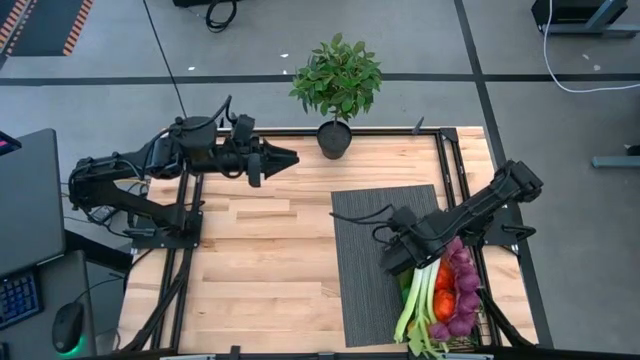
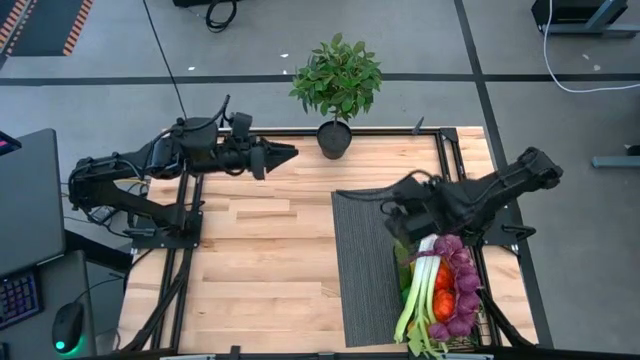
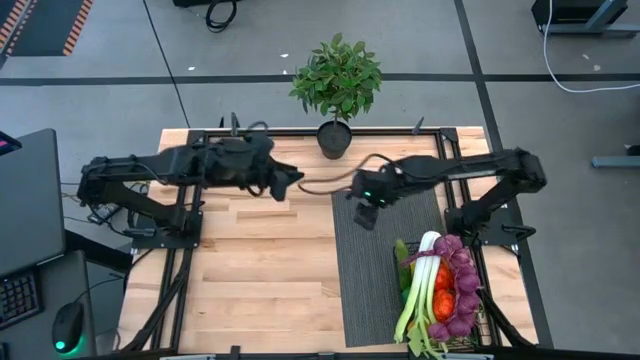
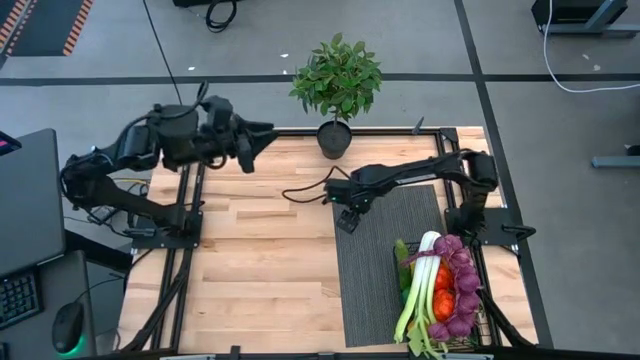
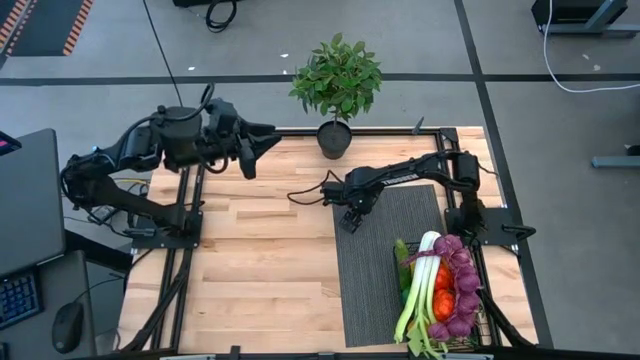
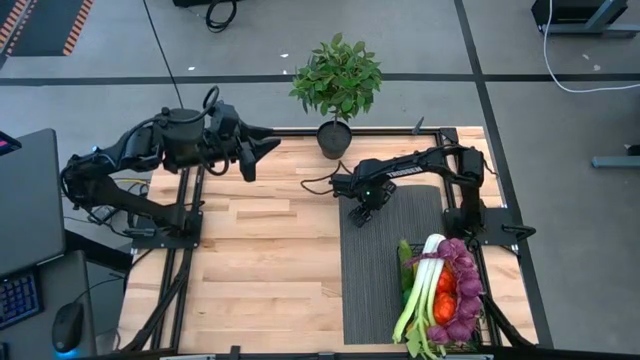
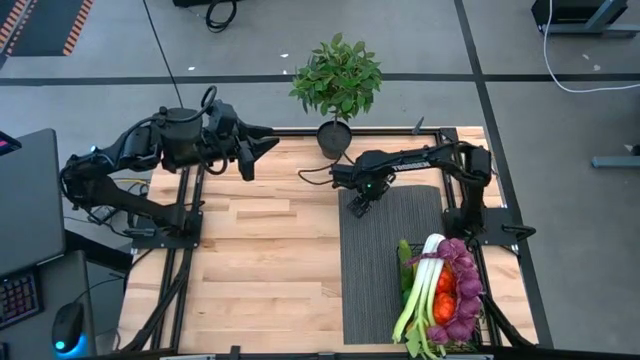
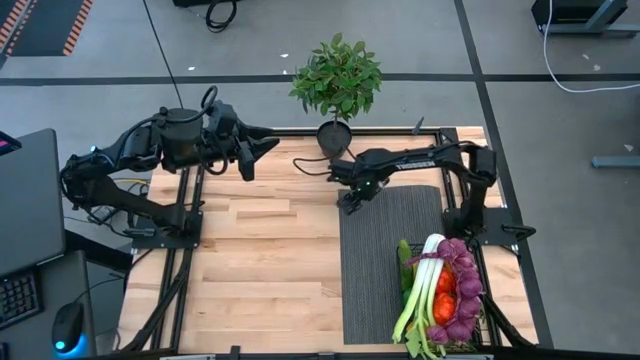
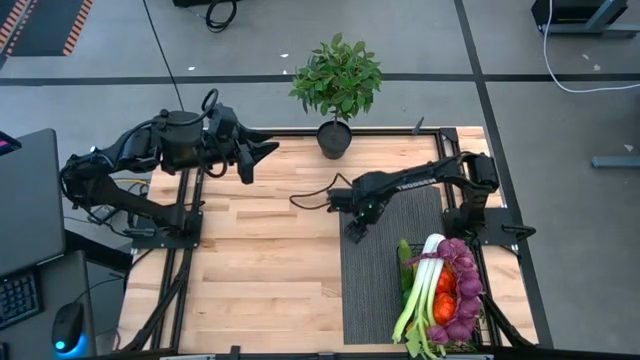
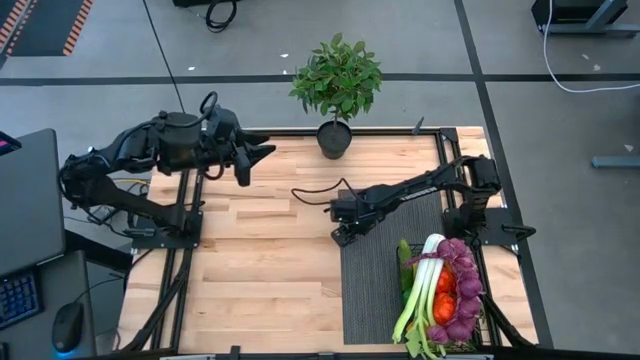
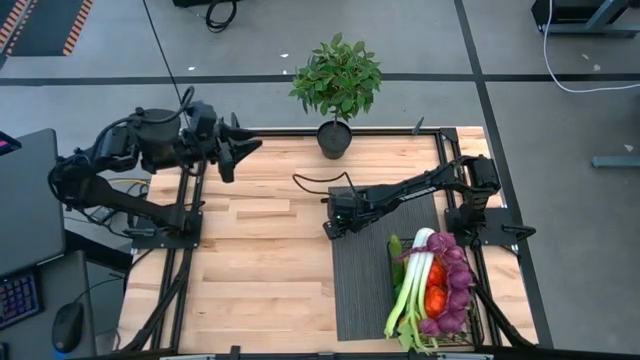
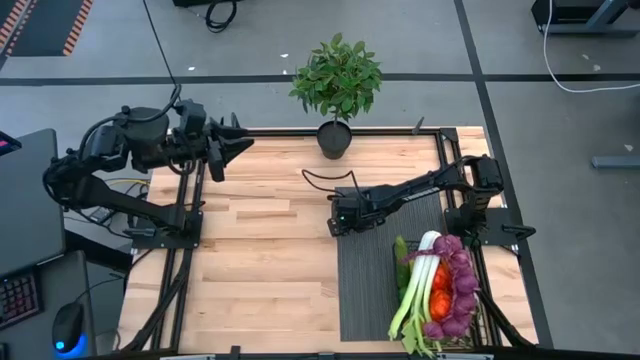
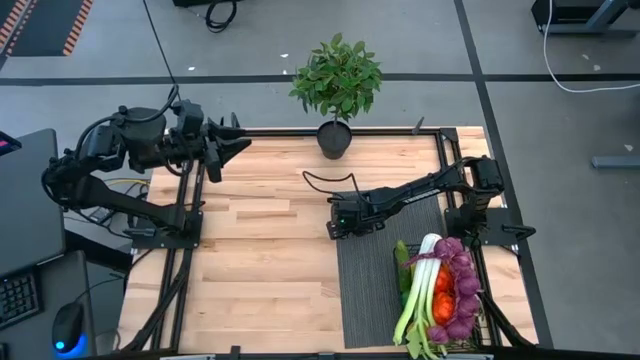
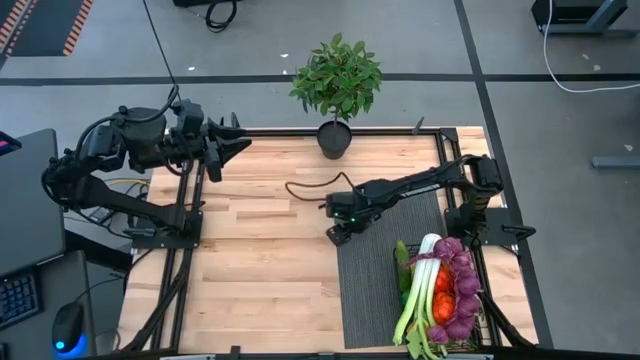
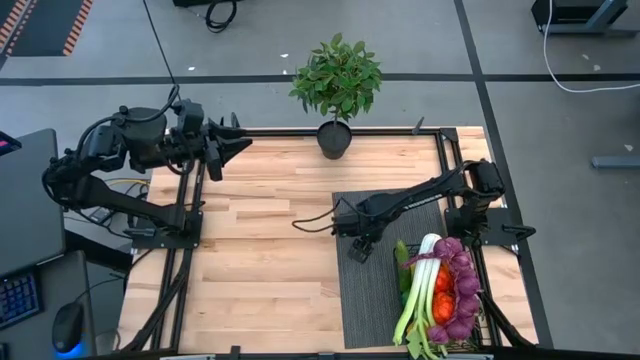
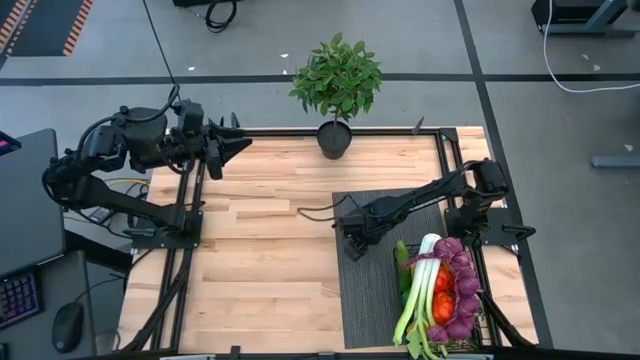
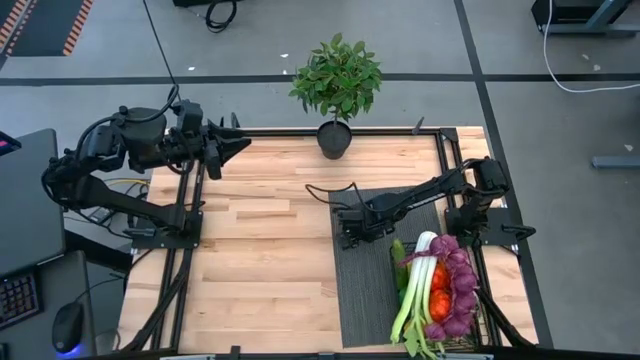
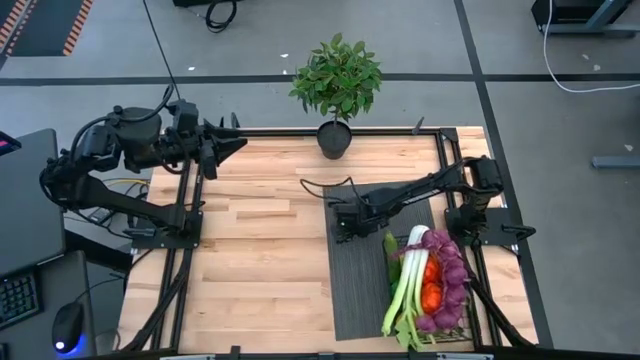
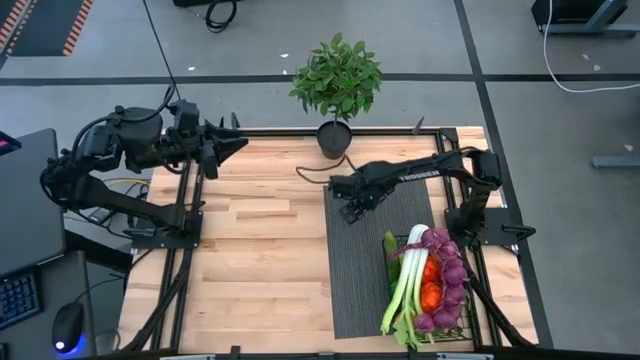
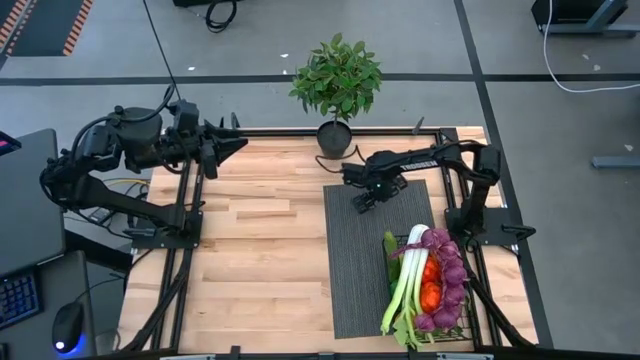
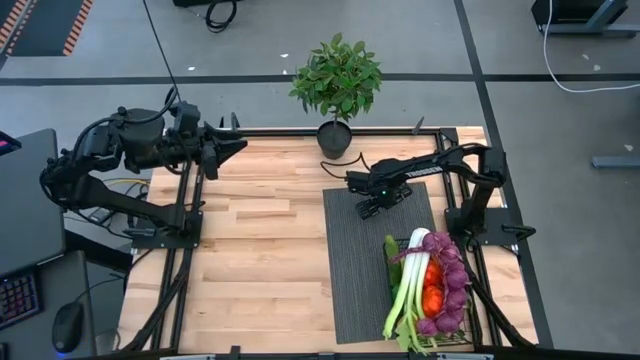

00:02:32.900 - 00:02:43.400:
Task: Build produce basket
Adjust the grey mat

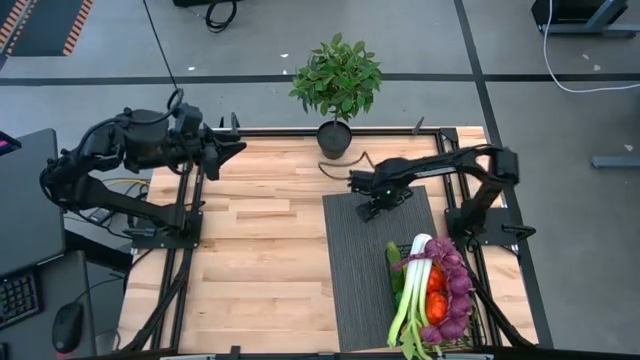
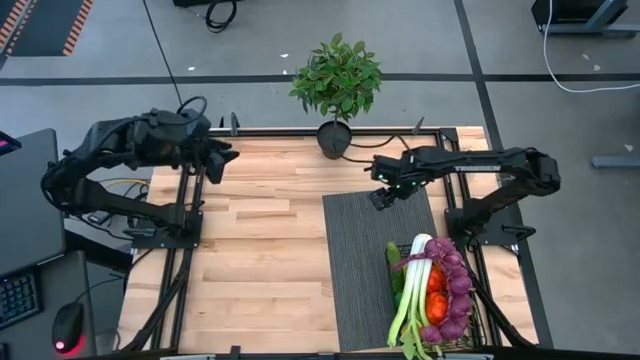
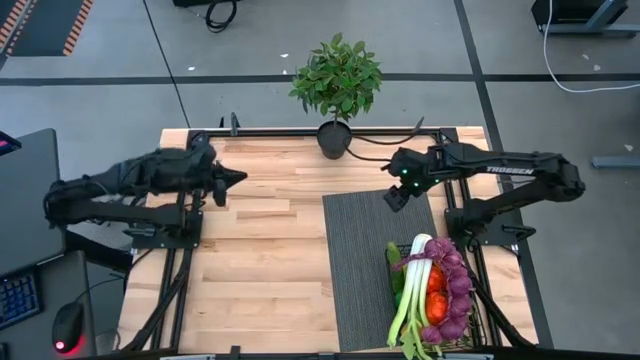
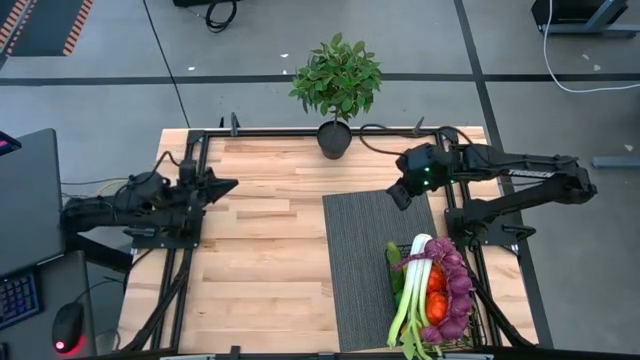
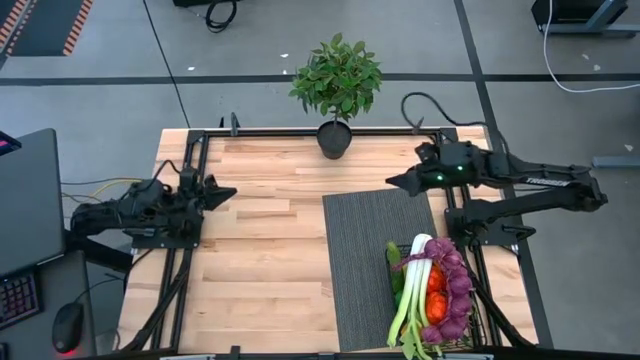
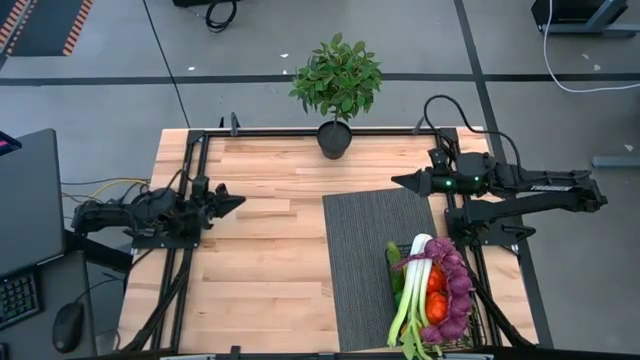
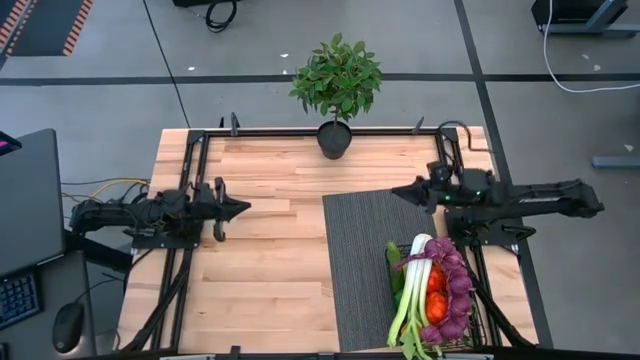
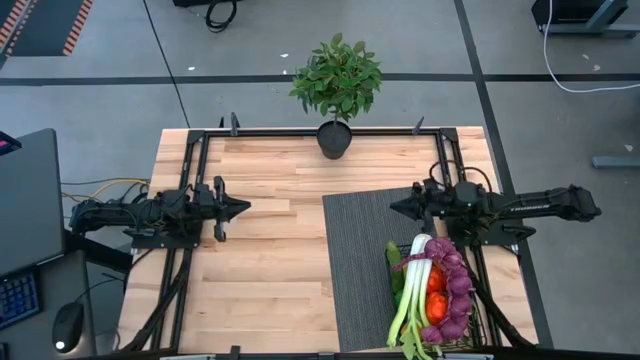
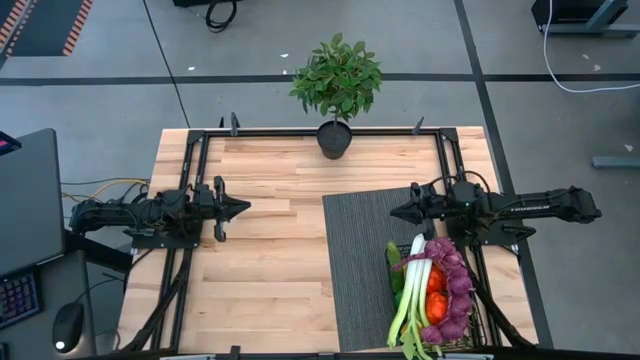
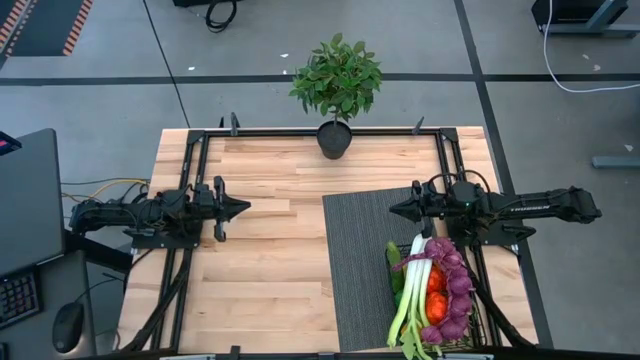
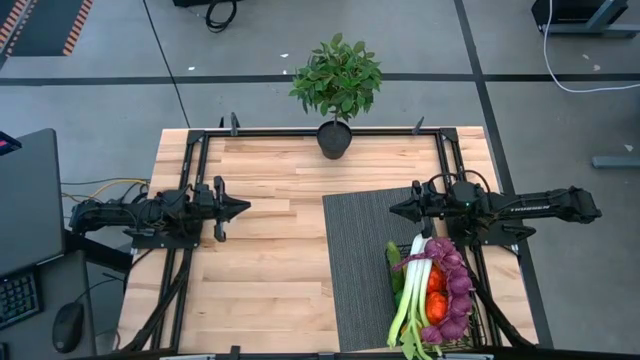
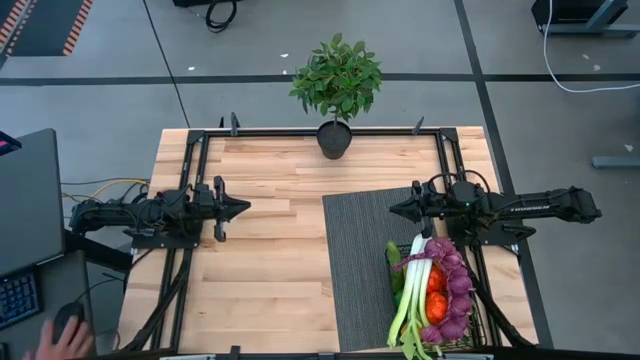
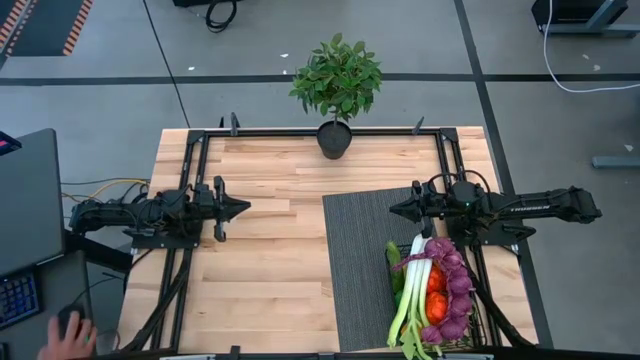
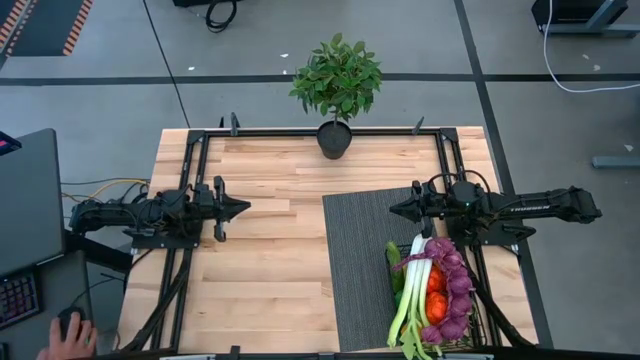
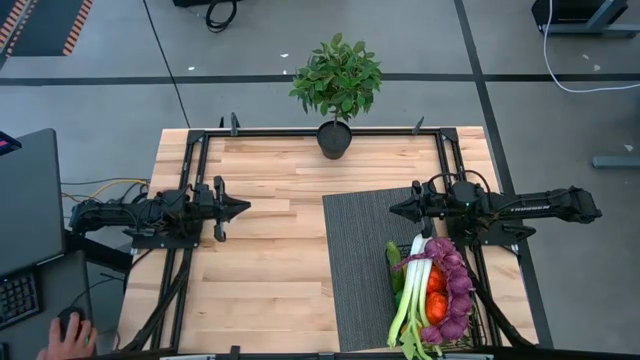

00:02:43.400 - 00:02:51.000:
Return to home position
